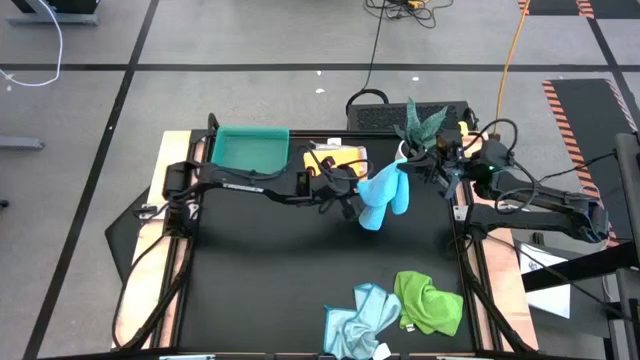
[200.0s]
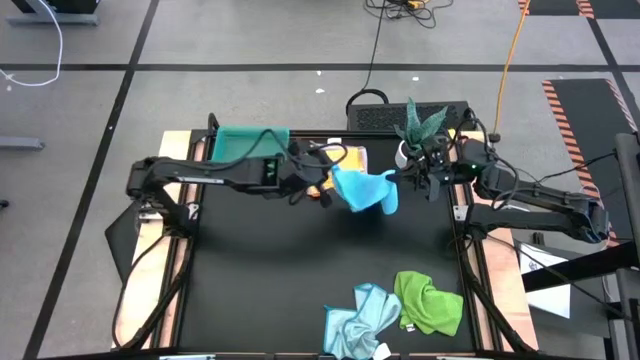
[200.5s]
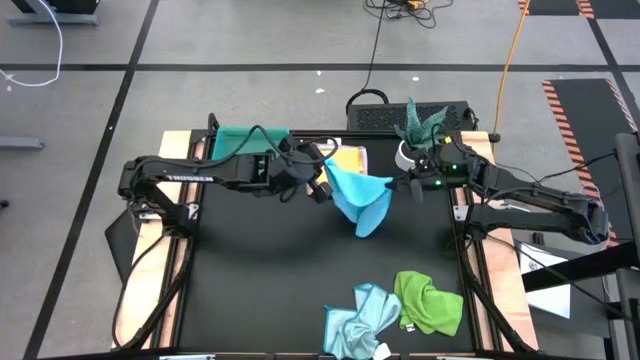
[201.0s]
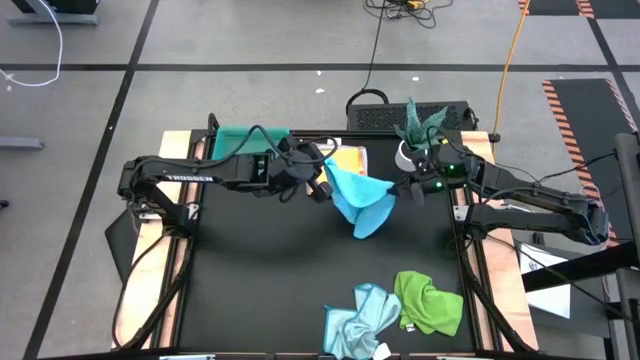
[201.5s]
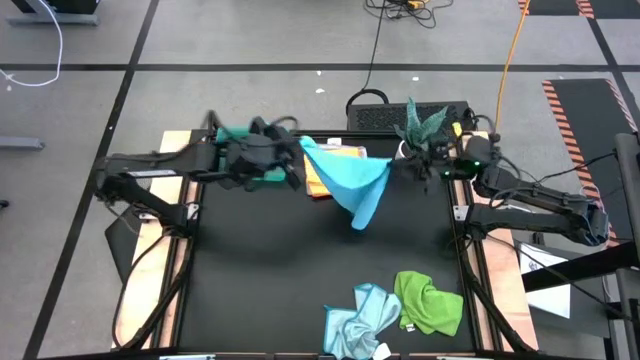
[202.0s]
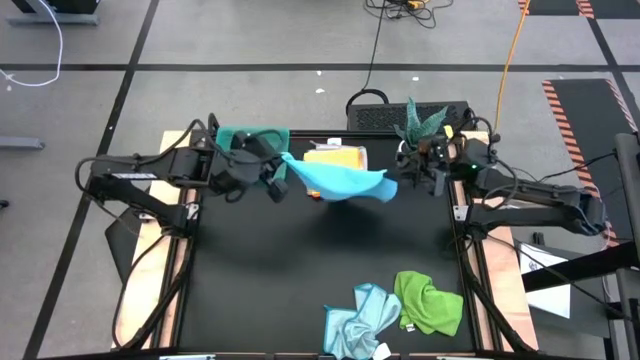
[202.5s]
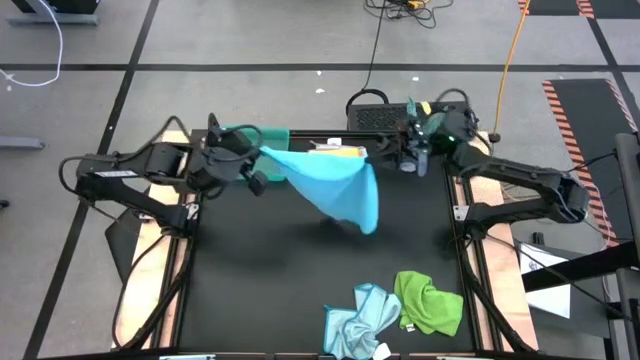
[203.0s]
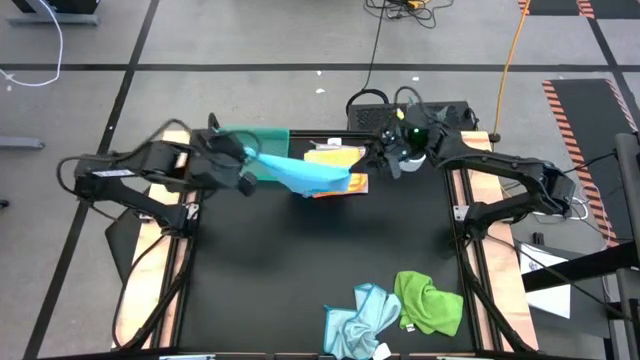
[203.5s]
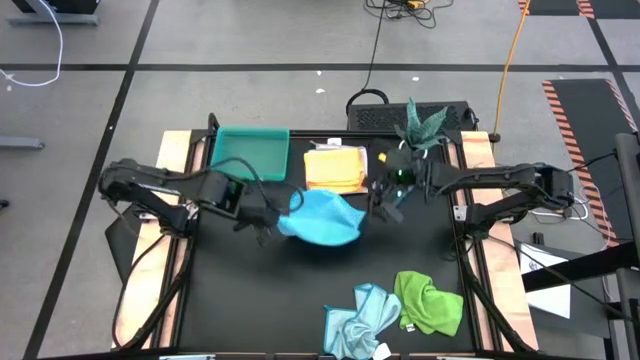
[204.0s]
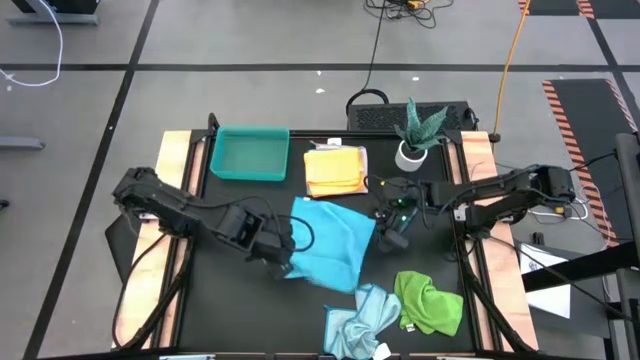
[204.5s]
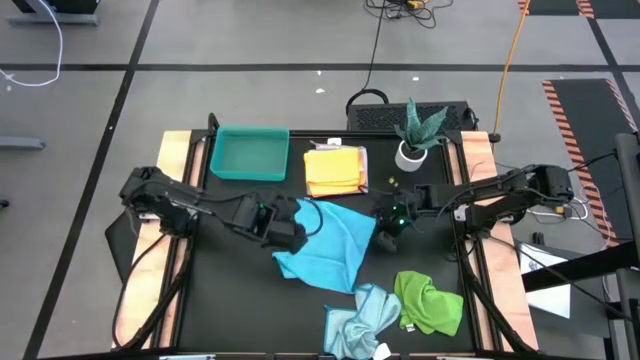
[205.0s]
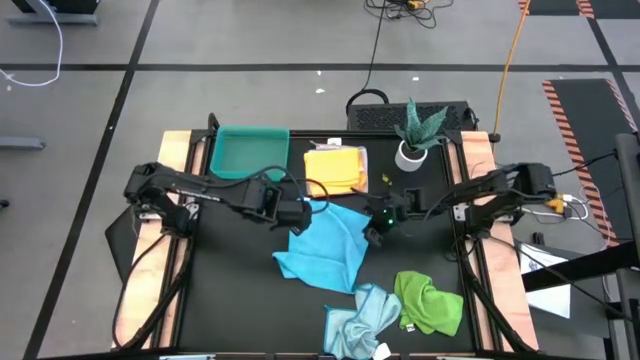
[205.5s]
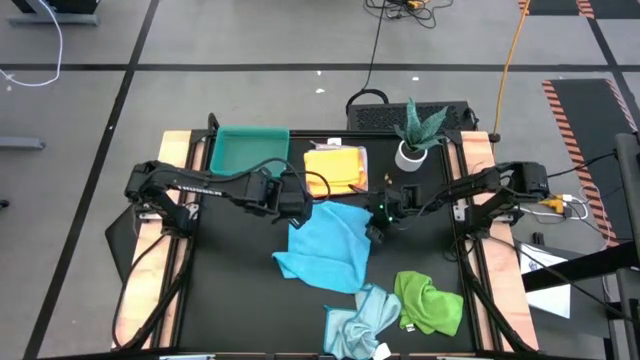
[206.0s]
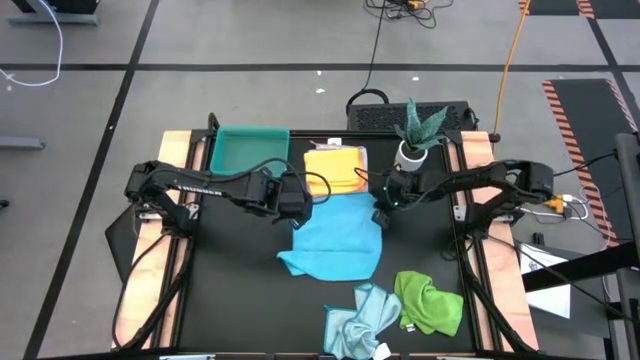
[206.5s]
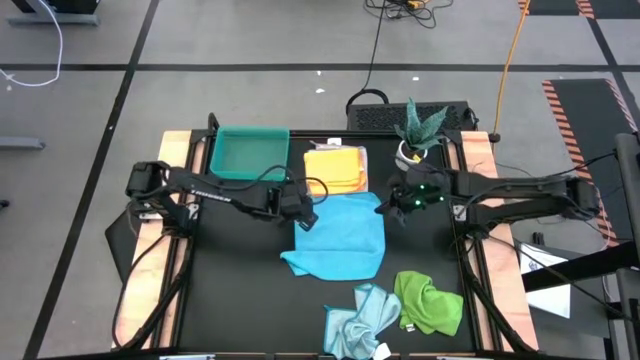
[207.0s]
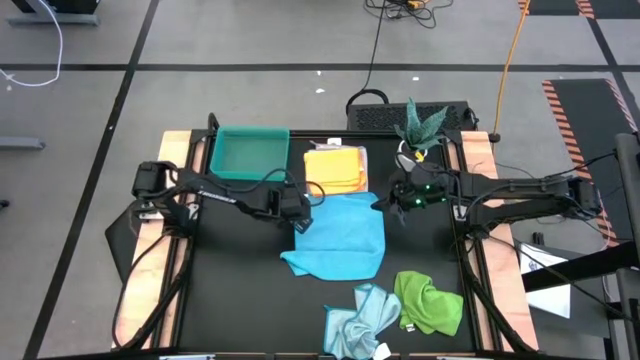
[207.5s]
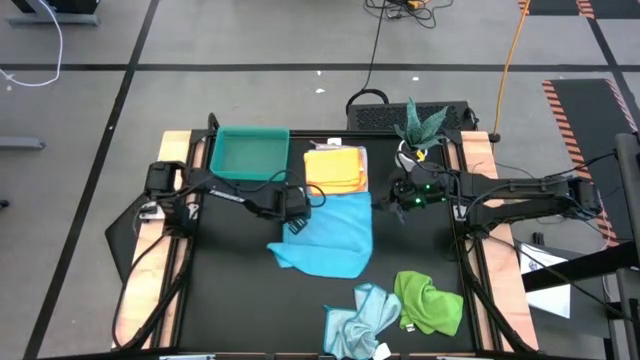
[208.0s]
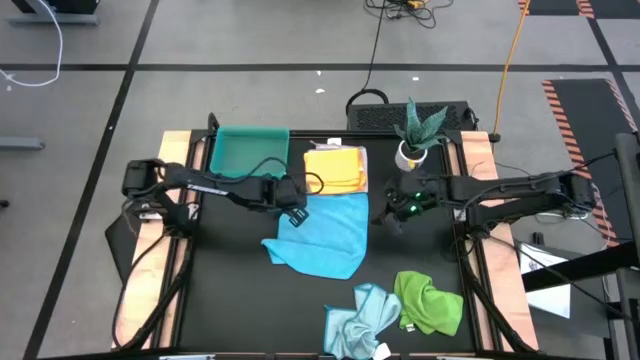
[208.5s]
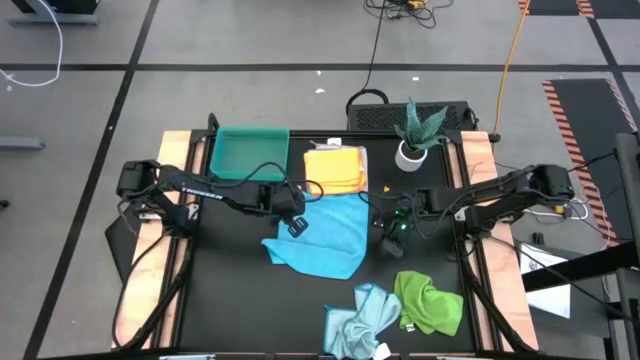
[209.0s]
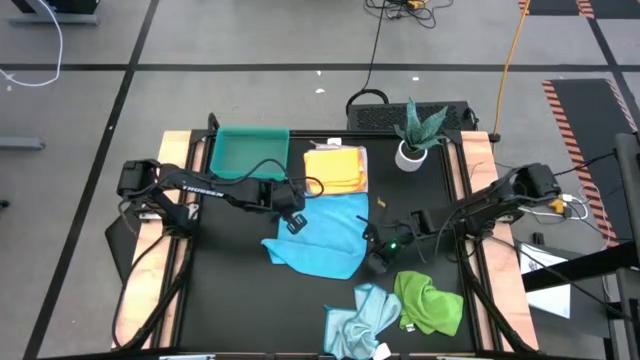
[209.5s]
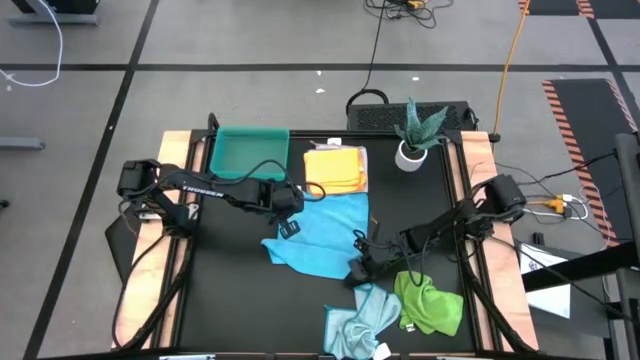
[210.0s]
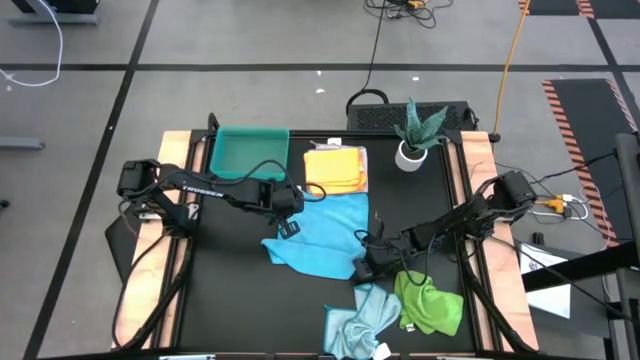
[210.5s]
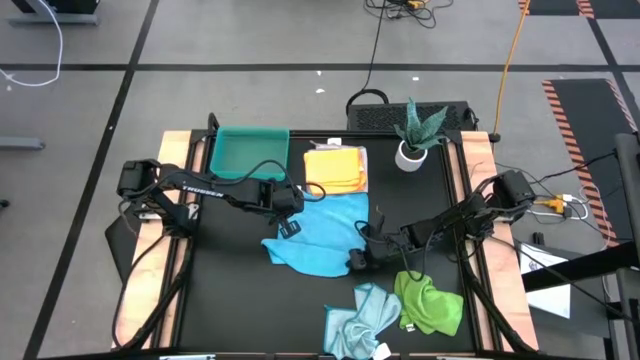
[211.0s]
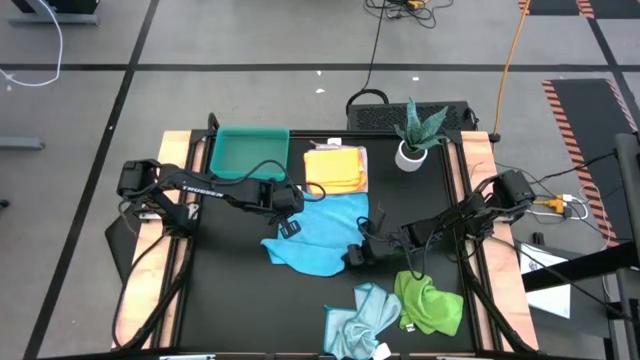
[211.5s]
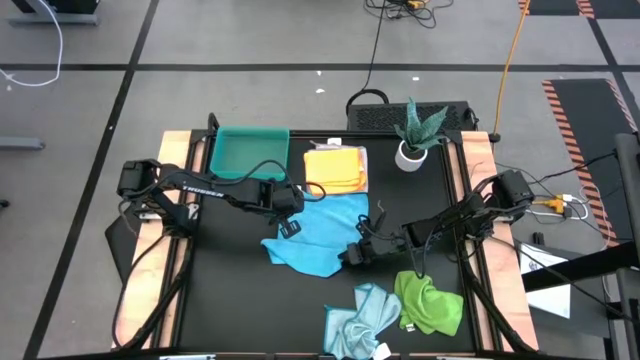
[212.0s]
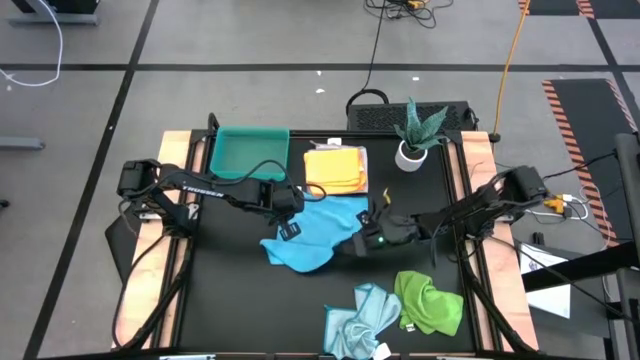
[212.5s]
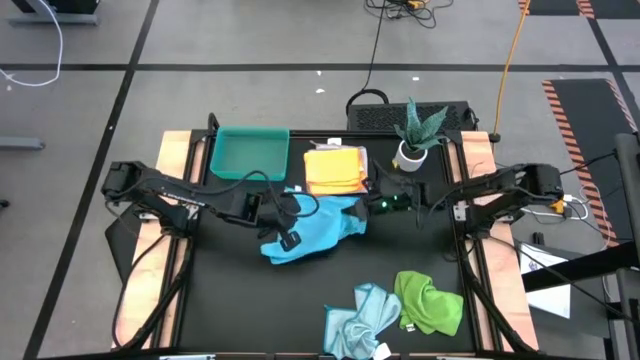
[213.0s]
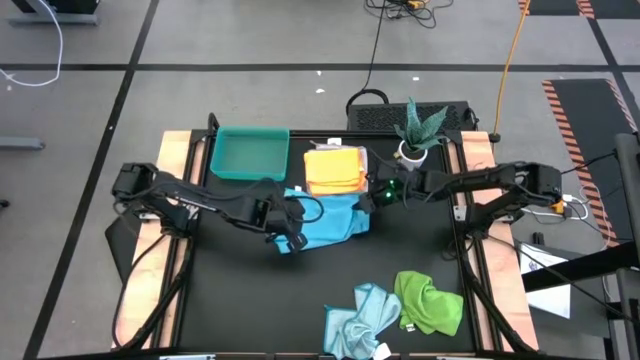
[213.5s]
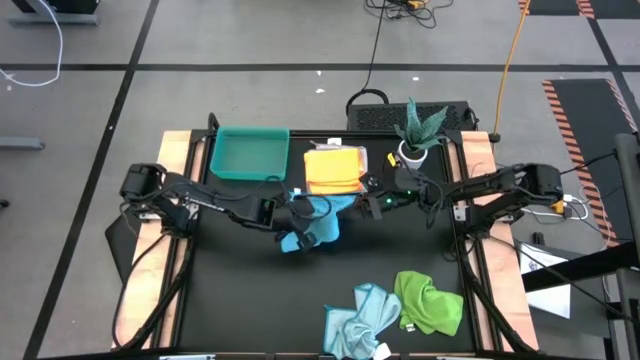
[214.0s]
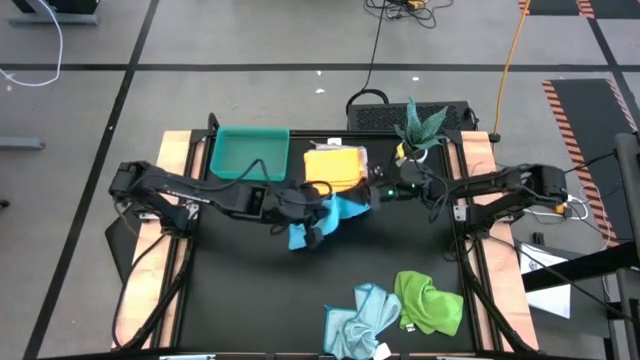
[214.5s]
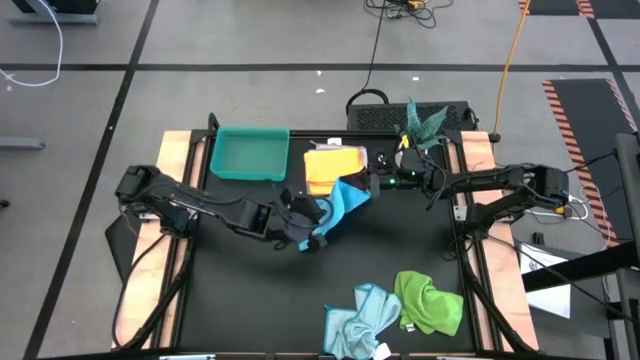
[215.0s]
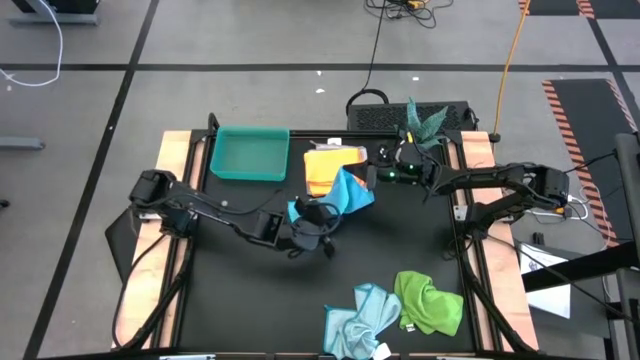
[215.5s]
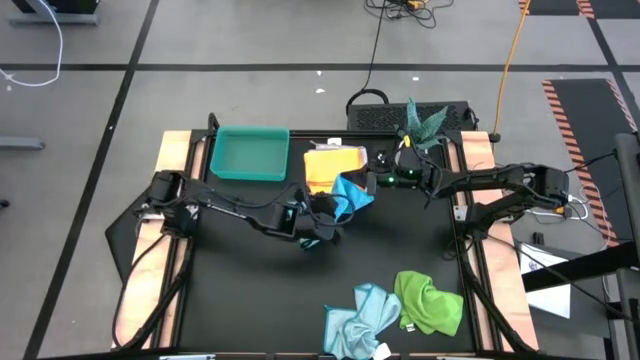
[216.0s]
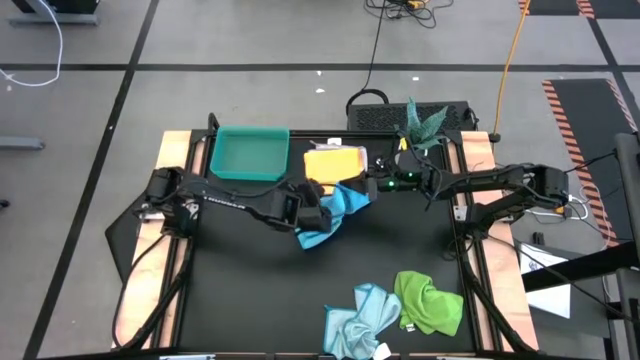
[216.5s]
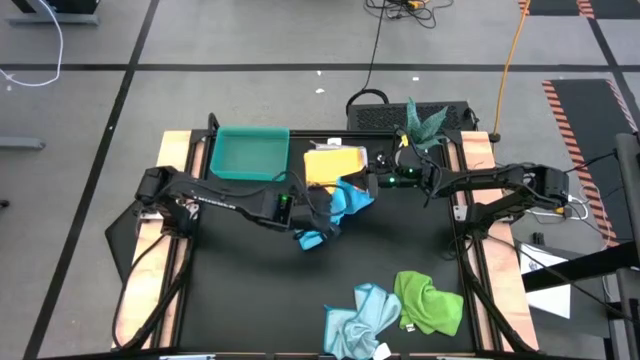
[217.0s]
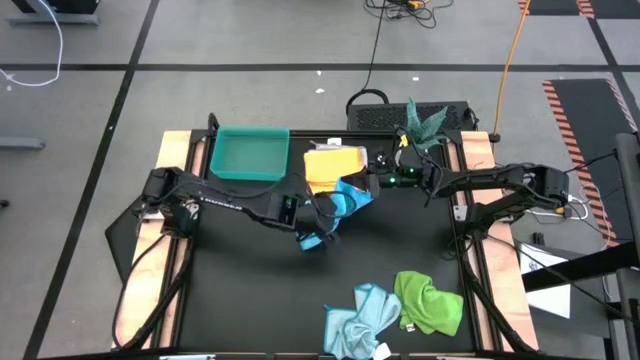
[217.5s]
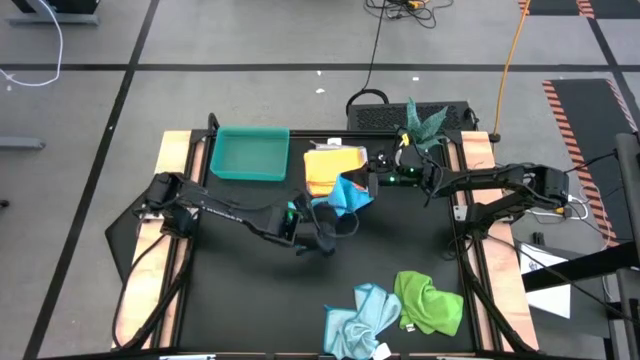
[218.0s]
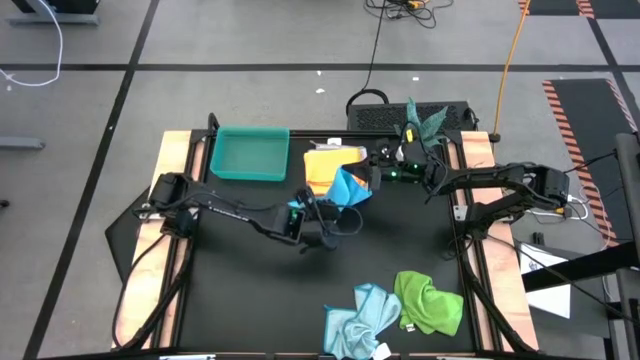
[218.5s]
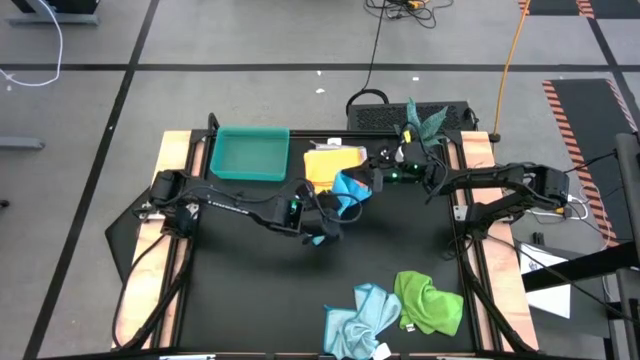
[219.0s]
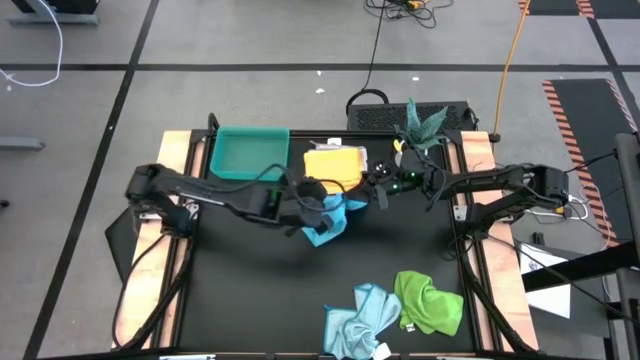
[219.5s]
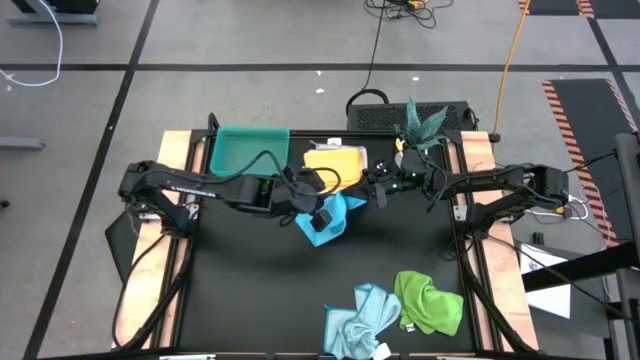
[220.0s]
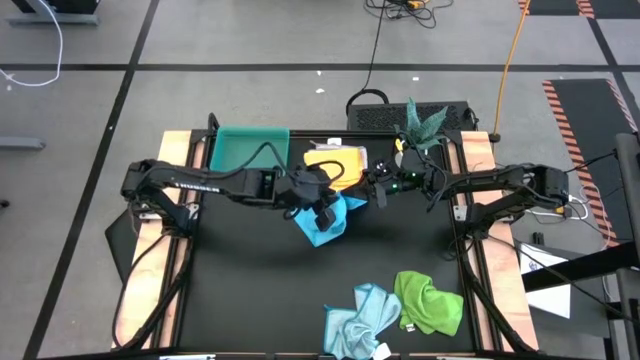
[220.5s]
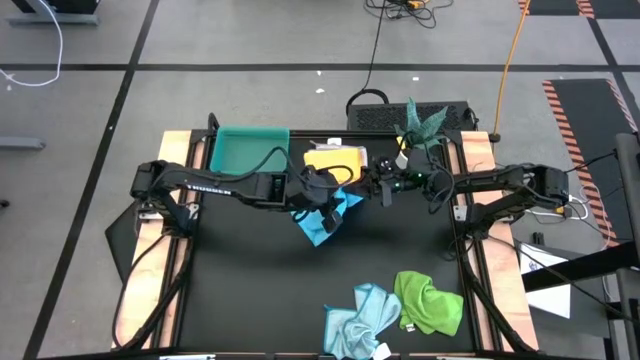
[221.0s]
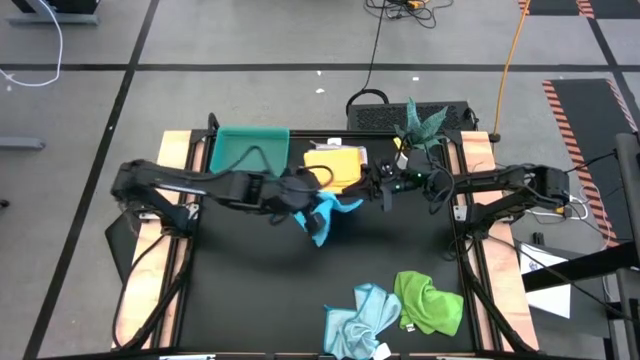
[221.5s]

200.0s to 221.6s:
Task: Fold microfiber towels
Fold the blue microfiber towel

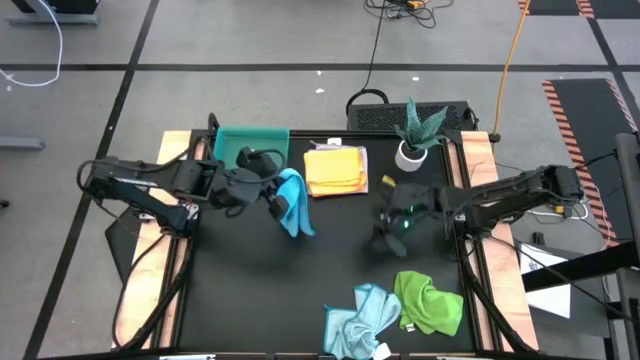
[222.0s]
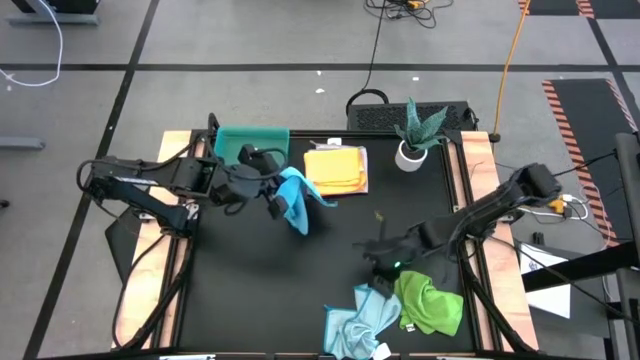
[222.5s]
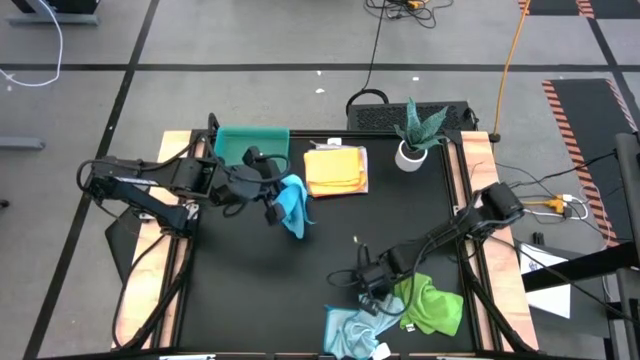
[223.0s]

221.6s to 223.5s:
Adjust the light blue microfiber towel
